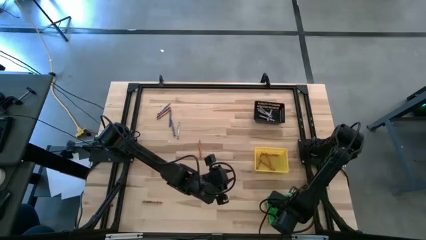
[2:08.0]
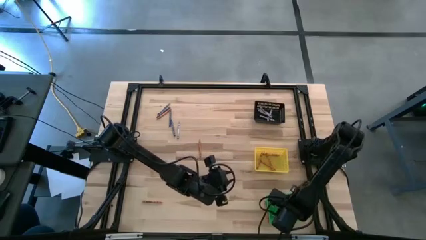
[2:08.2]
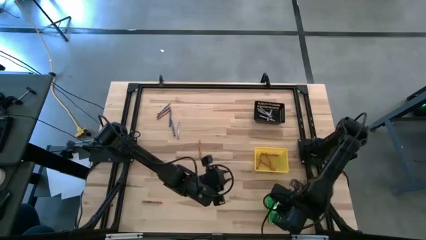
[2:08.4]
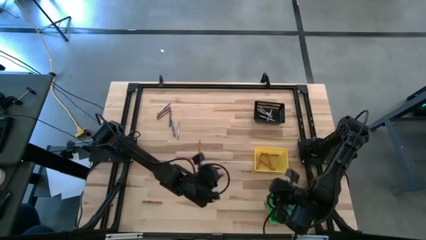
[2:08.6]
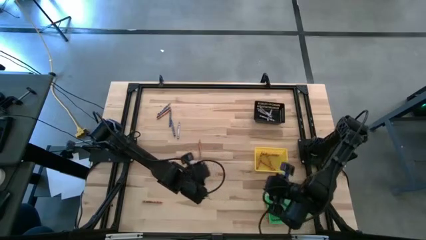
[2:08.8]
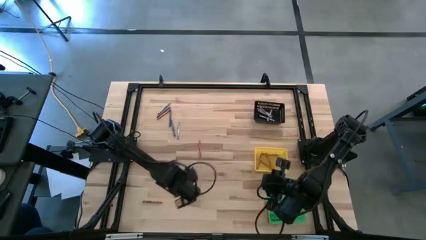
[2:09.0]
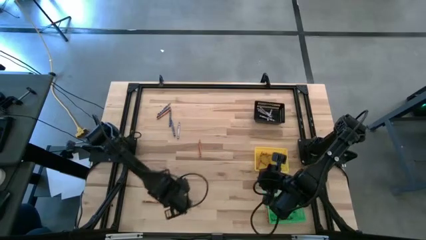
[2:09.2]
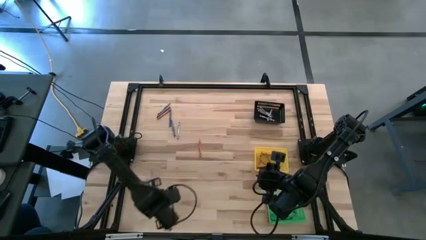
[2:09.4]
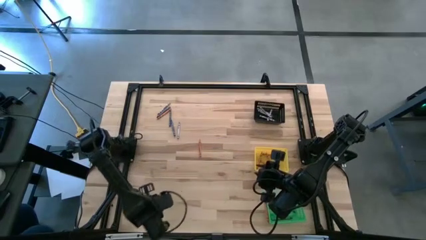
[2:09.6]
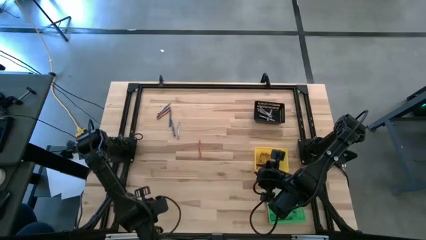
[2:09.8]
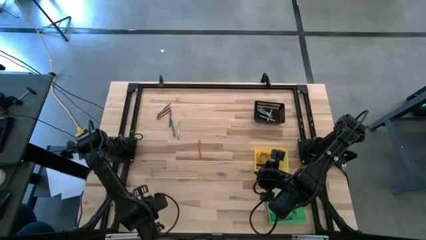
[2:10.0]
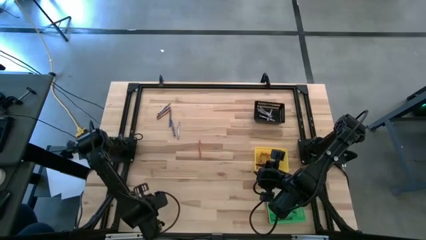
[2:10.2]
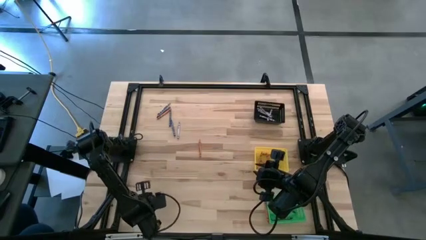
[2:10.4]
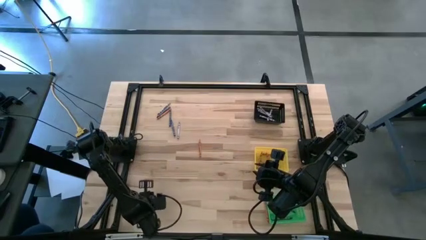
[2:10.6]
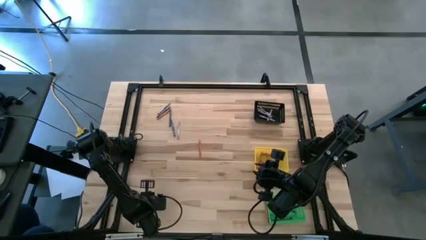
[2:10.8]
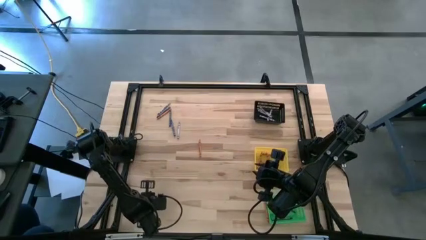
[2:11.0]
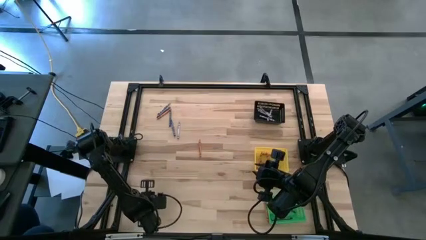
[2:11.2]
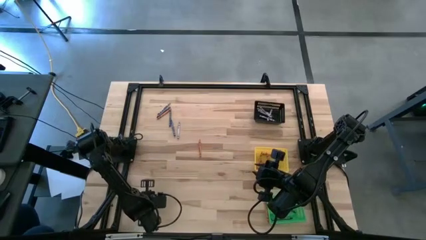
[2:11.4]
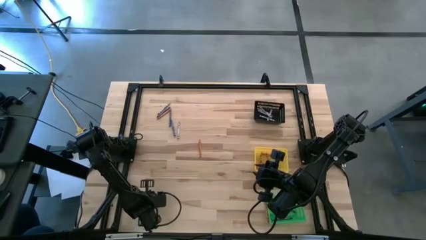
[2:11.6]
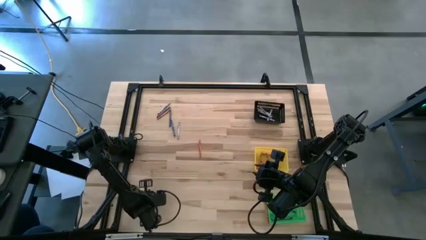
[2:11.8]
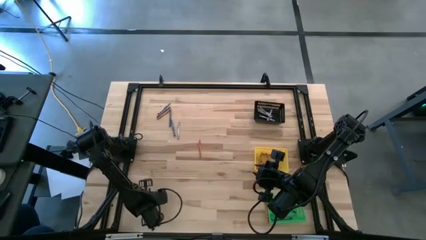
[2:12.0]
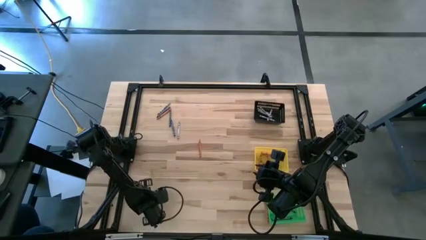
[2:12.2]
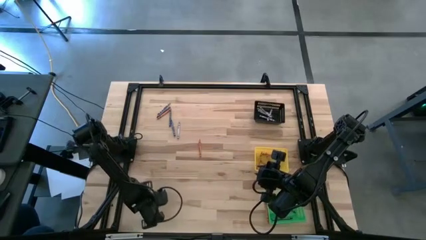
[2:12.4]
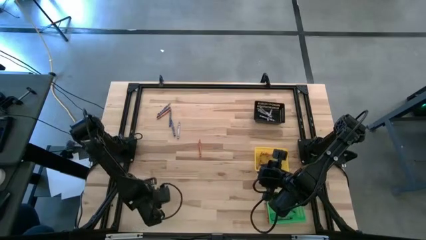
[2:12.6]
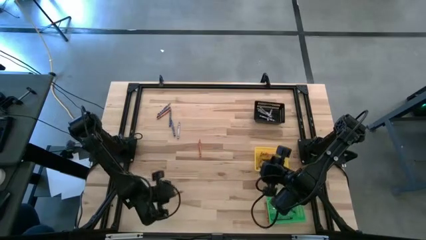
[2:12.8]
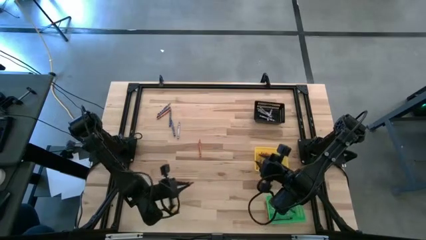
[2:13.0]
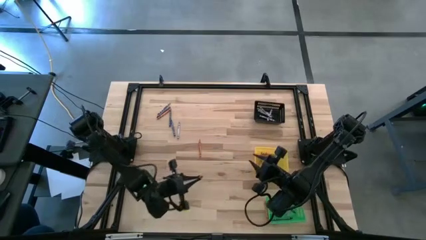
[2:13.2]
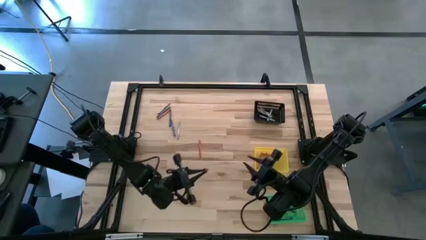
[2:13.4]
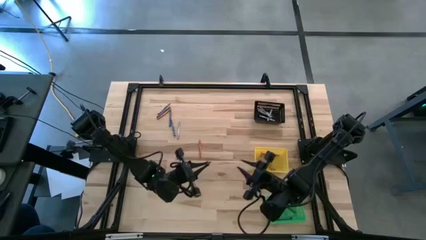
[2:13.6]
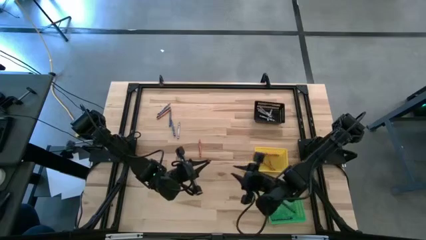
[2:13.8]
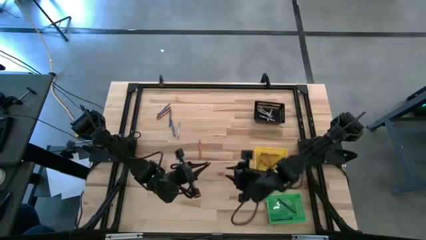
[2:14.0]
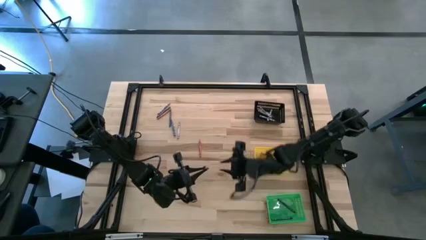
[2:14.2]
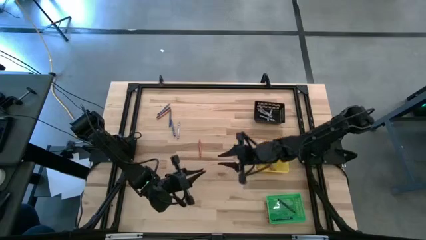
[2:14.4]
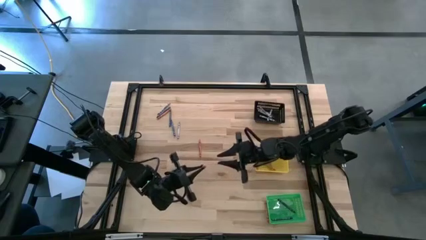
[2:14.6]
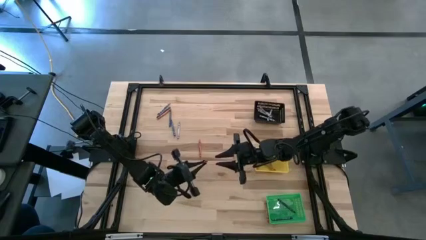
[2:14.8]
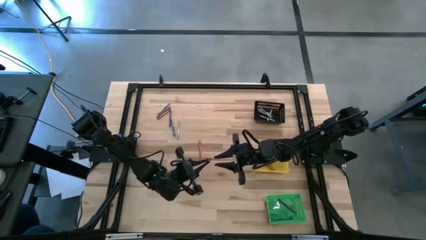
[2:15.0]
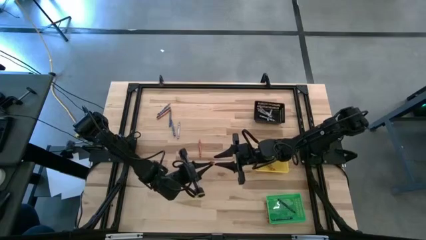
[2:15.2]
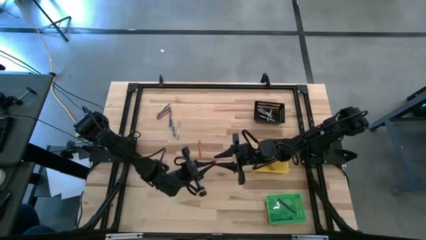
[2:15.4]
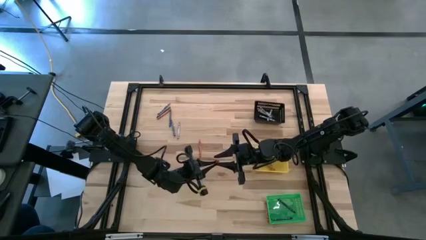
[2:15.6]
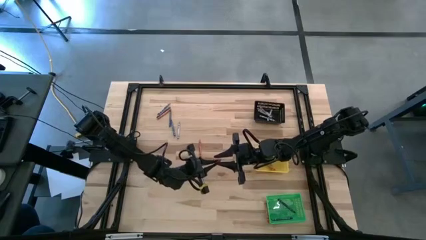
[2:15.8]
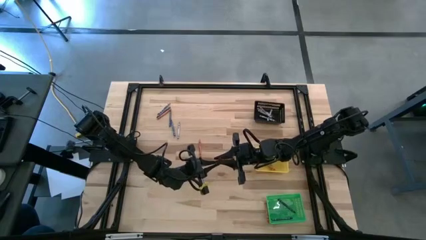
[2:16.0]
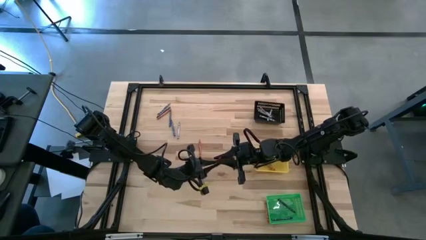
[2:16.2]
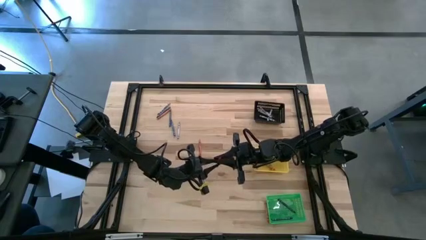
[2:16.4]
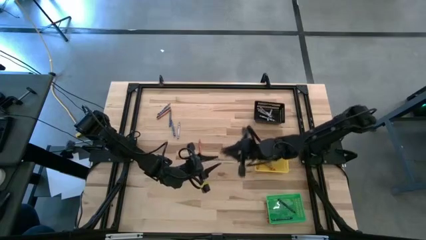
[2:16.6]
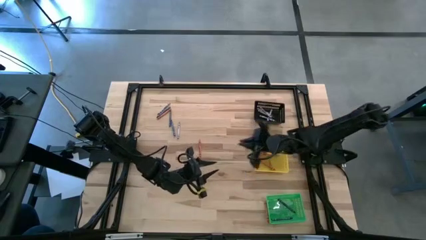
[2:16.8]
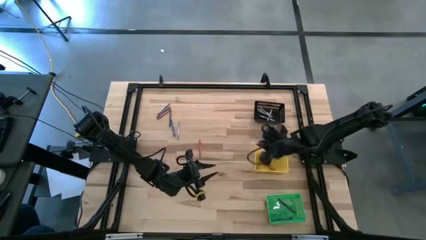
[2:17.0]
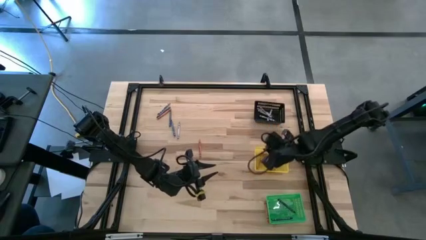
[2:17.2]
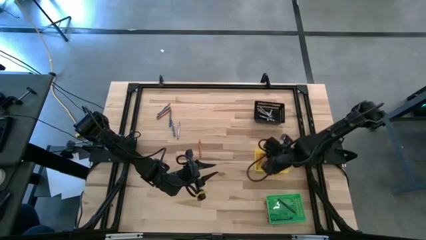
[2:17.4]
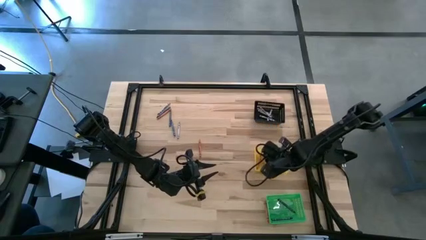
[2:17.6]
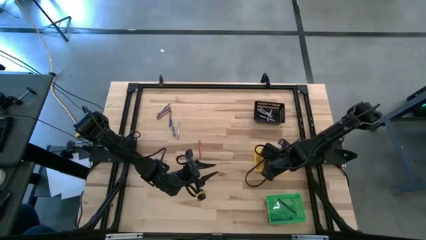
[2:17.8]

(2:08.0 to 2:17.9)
Task: Sort crayons
Put the orange crayon into the yellow basket

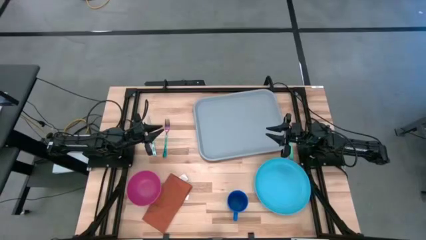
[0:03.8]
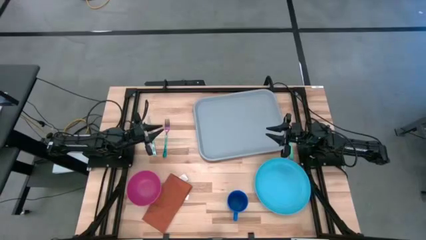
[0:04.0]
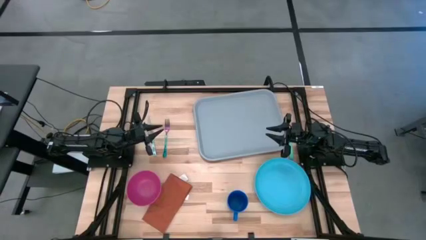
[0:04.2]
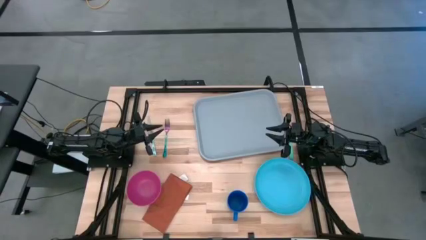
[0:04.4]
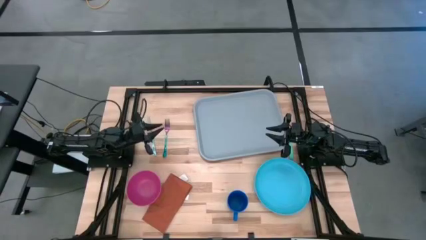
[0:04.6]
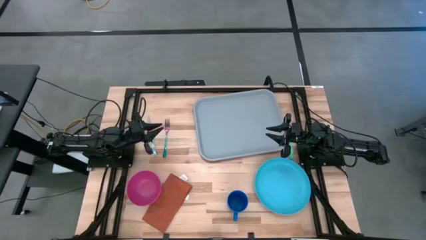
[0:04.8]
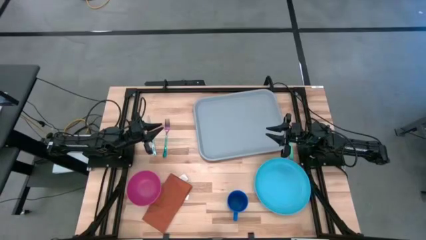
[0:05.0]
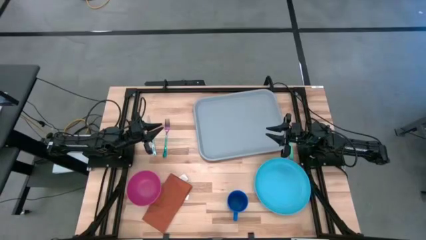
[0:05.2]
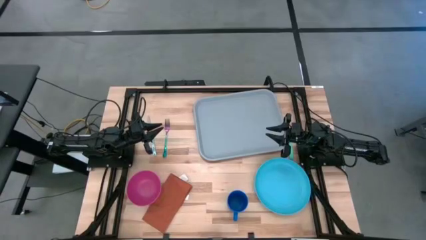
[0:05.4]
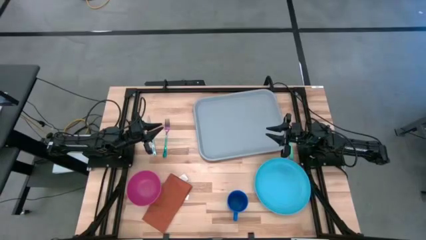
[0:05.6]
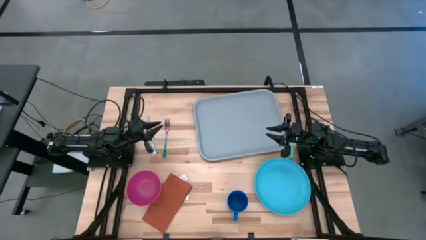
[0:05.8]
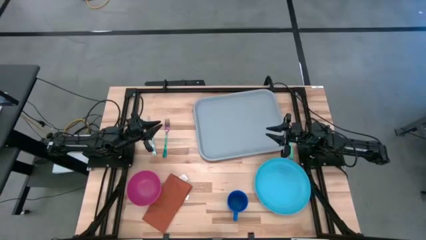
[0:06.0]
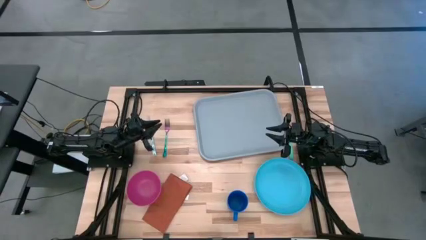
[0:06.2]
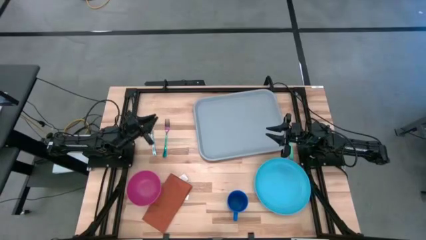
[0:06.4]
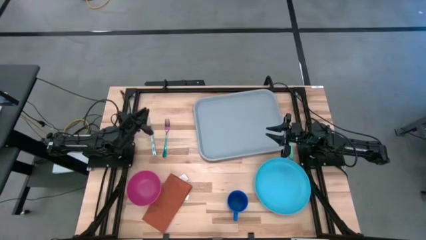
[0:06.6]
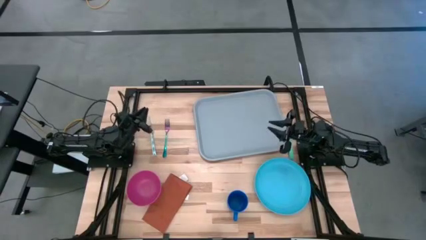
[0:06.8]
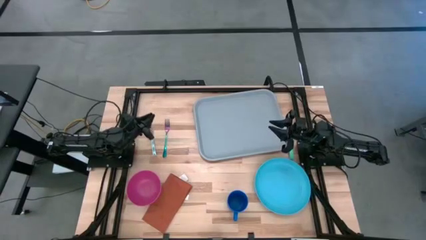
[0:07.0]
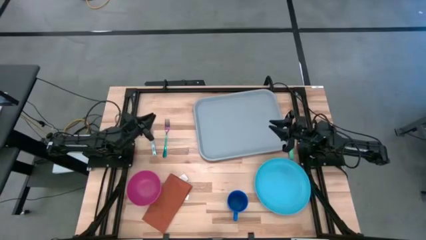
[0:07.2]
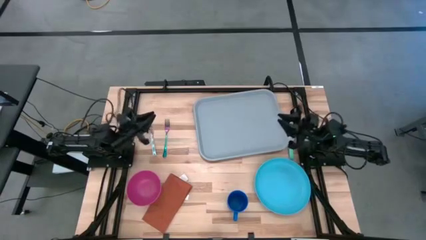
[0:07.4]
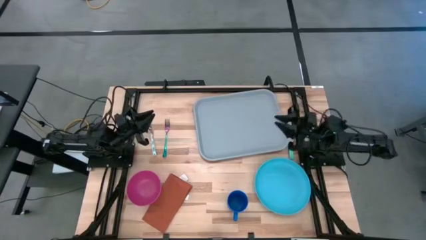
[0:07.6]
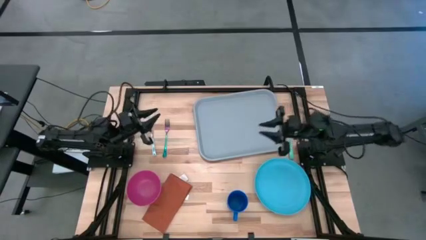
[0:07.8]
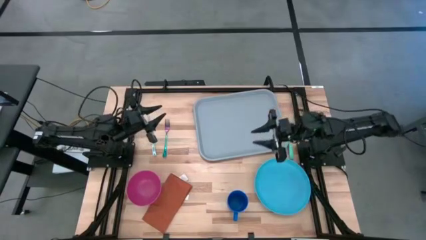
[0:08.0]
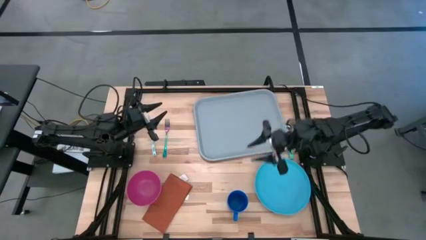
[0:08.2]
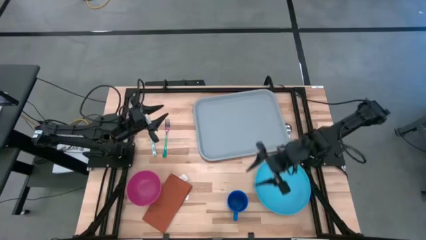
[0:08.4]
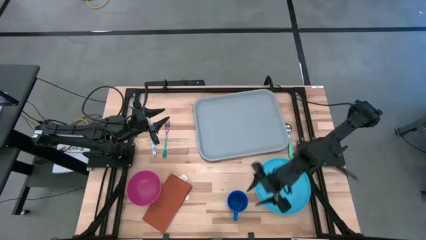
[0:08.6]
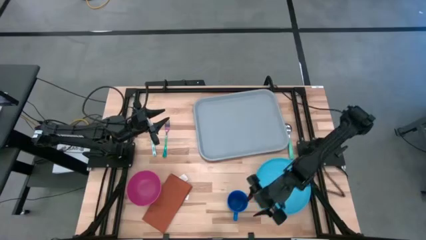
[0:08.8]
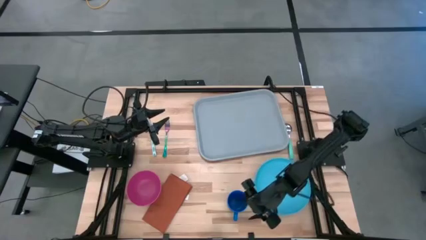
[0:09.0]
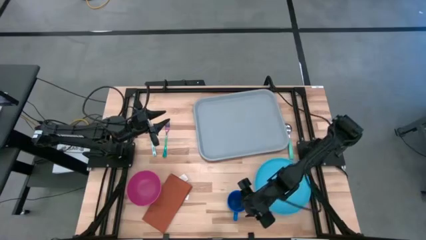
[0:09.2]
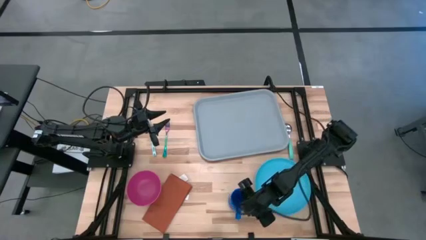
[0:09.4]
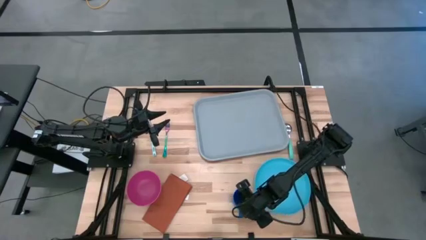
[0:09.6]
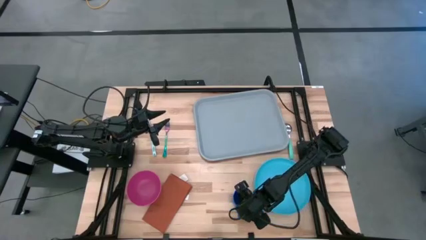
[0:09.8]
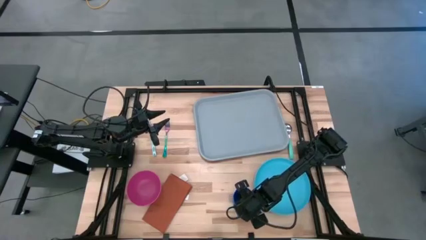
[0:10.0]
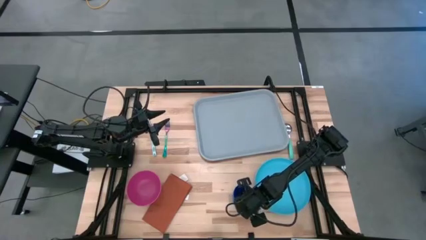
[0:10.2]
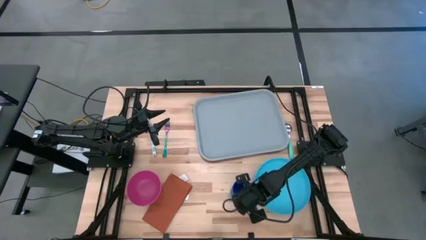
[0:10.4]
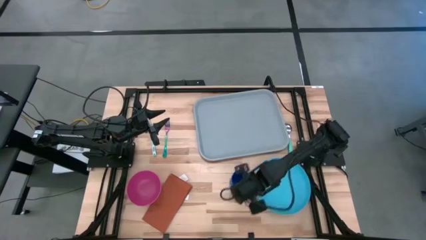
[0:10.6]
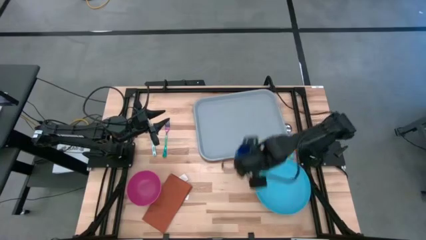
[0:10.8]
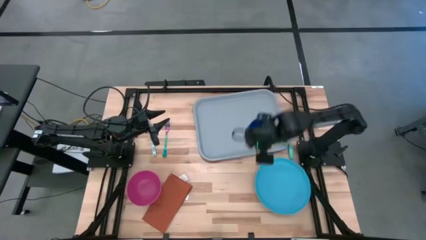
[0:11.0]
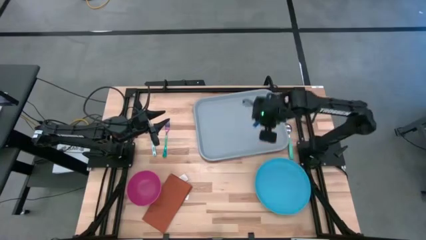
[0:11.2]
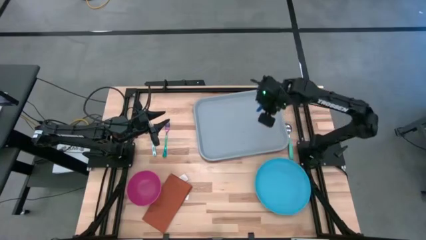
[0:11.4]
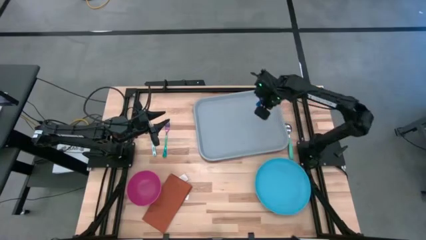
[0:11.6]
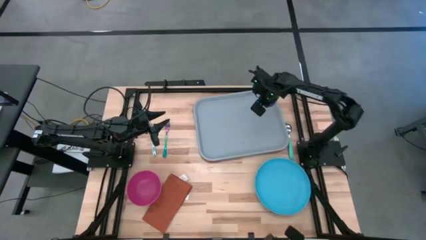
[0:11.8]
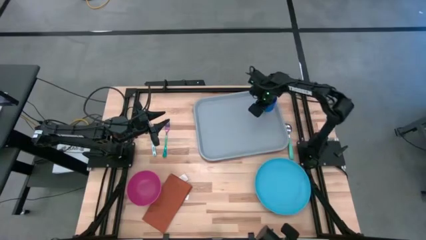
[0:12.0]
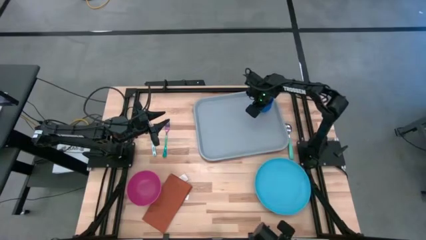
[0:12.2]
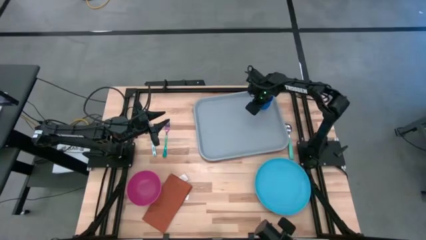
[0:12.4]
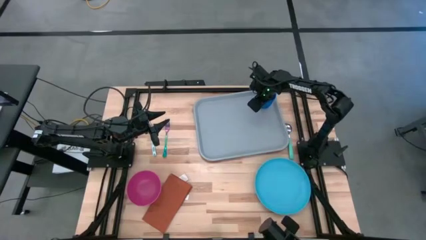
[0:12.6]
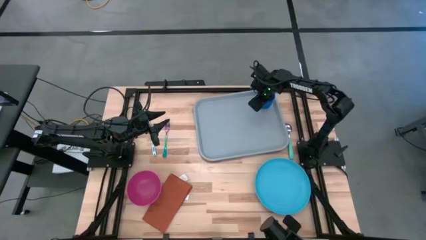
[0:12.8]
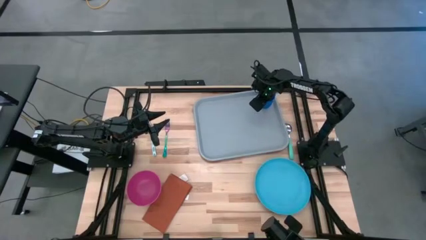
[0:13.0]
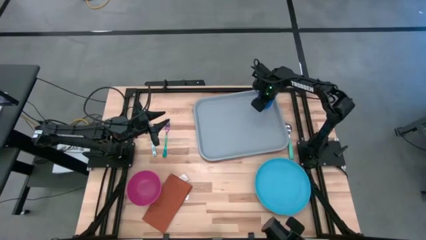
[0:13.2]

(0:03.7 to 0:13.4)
Task: Set up tray
Put the blue mug on the top right of the gray serving tray
